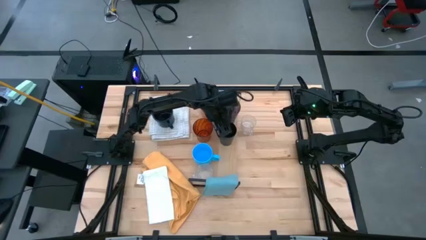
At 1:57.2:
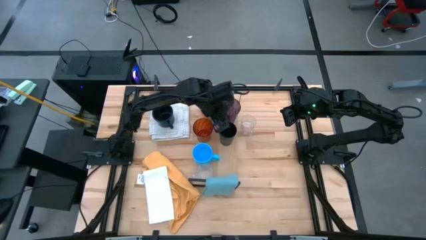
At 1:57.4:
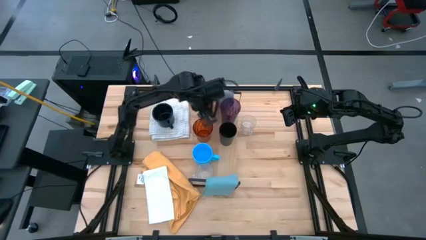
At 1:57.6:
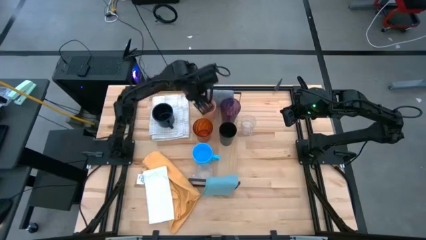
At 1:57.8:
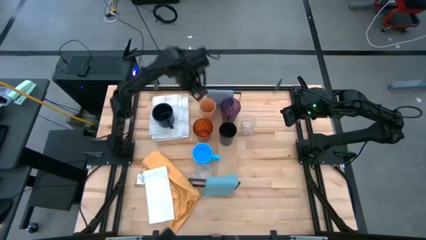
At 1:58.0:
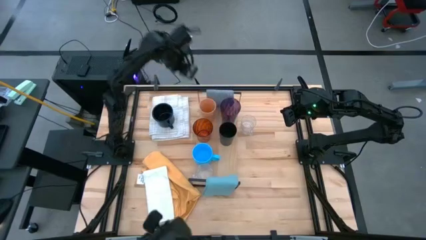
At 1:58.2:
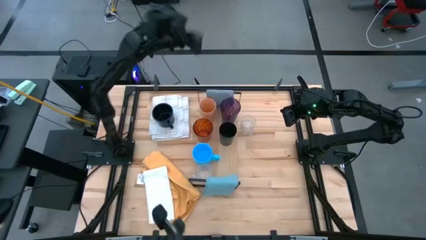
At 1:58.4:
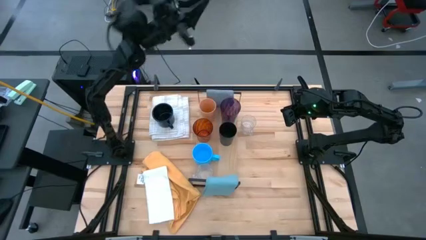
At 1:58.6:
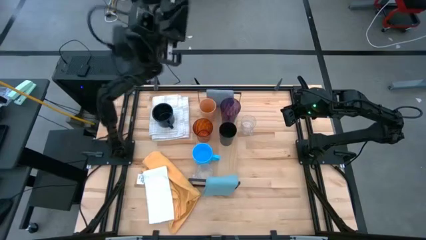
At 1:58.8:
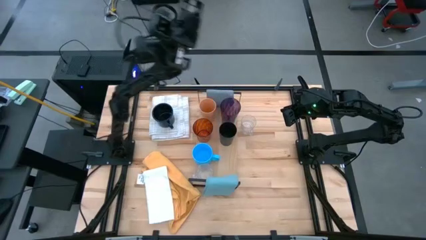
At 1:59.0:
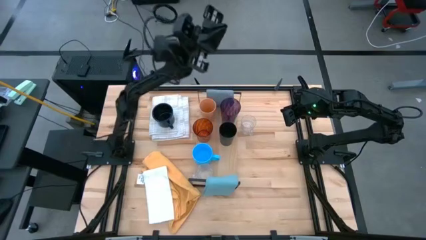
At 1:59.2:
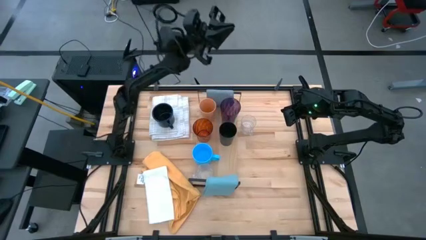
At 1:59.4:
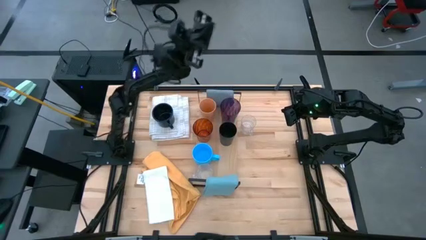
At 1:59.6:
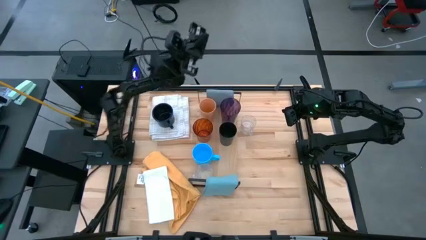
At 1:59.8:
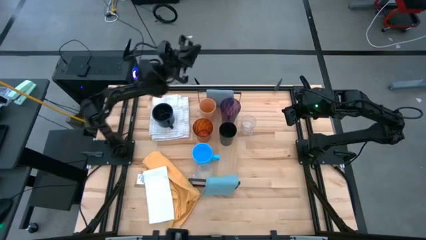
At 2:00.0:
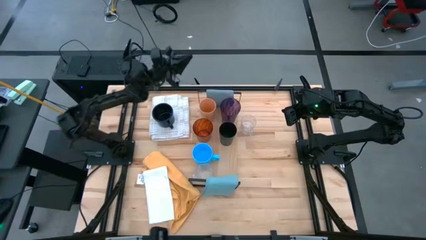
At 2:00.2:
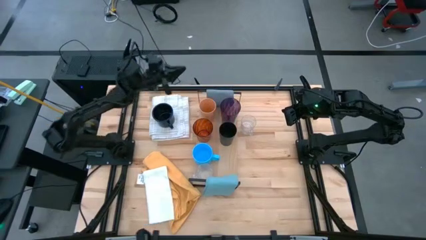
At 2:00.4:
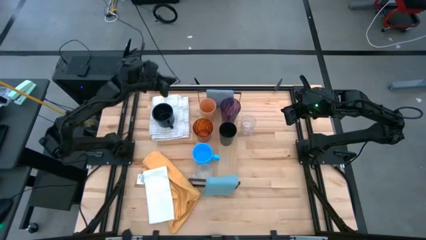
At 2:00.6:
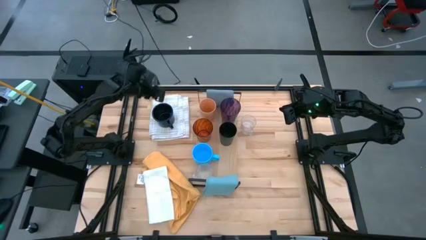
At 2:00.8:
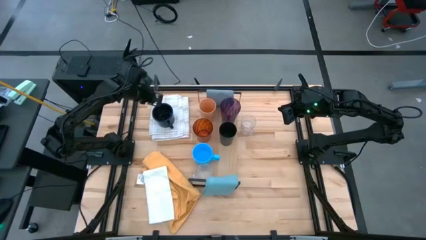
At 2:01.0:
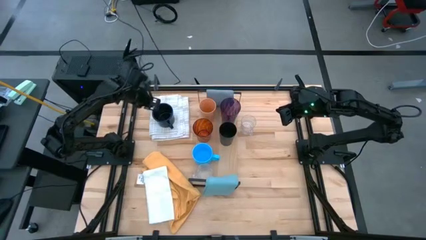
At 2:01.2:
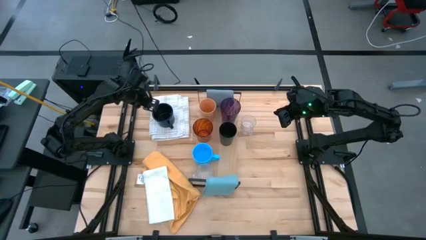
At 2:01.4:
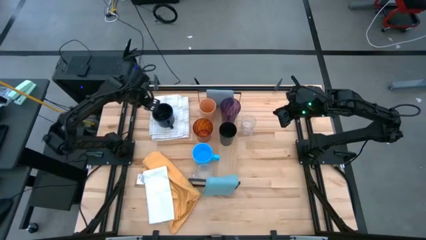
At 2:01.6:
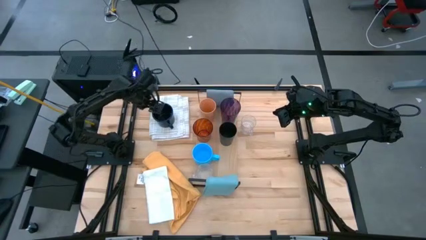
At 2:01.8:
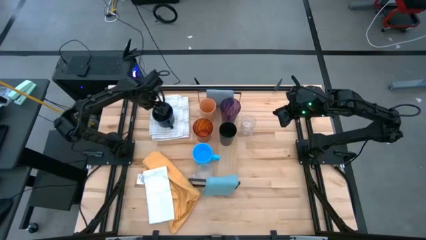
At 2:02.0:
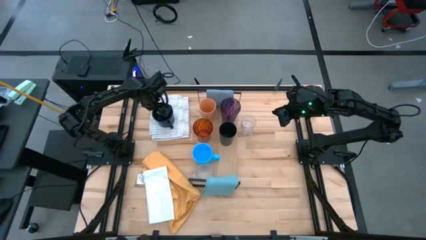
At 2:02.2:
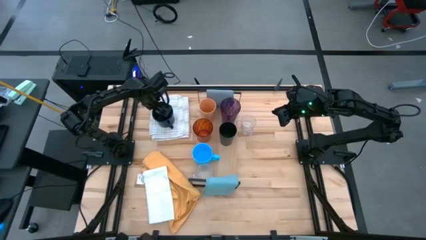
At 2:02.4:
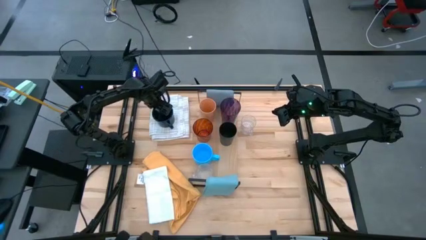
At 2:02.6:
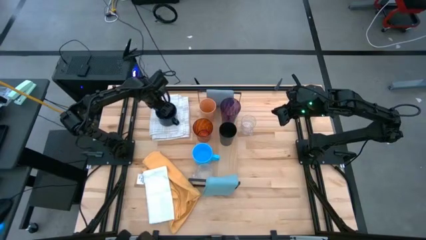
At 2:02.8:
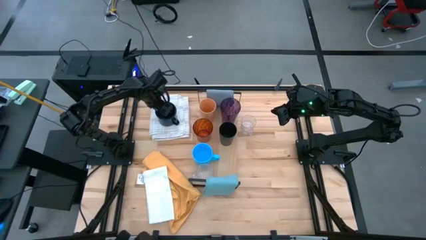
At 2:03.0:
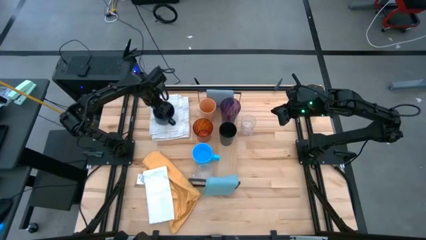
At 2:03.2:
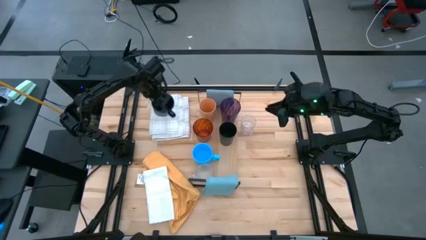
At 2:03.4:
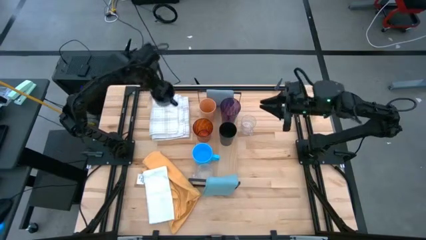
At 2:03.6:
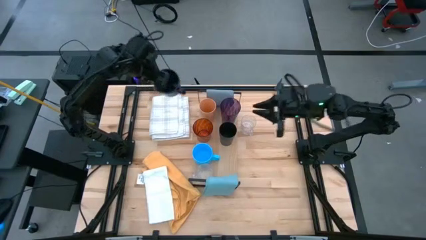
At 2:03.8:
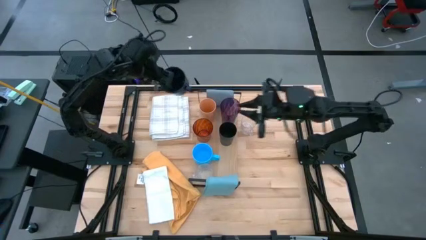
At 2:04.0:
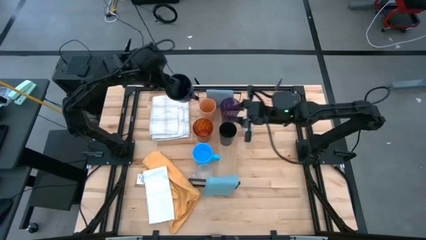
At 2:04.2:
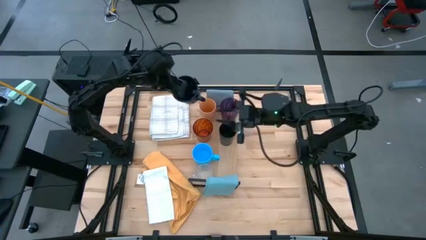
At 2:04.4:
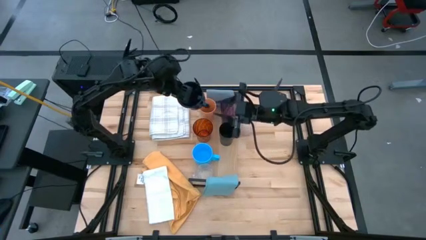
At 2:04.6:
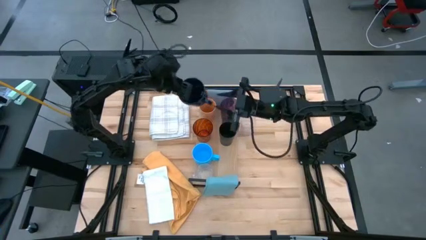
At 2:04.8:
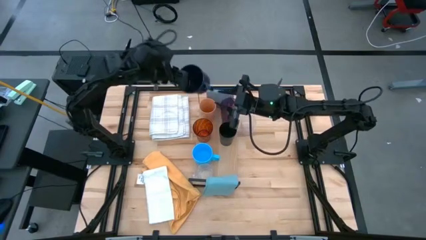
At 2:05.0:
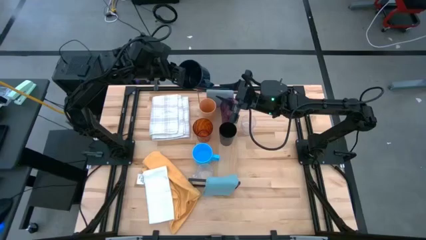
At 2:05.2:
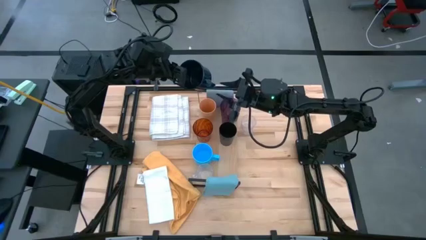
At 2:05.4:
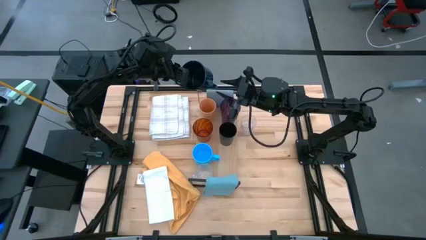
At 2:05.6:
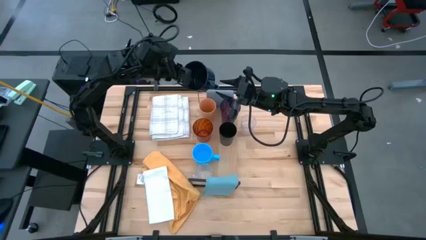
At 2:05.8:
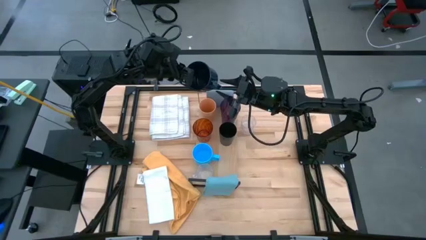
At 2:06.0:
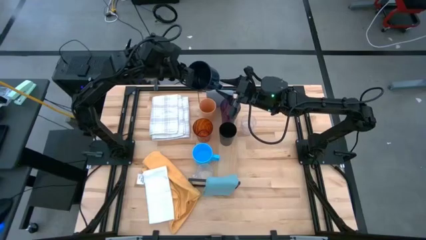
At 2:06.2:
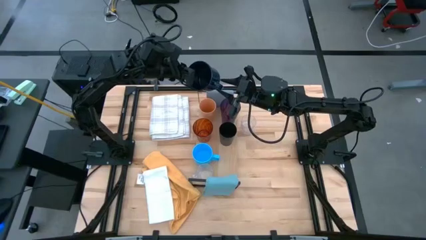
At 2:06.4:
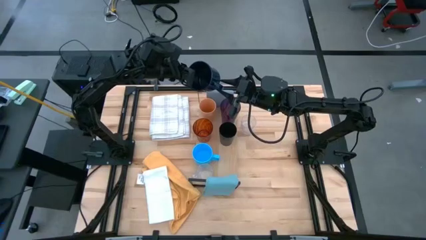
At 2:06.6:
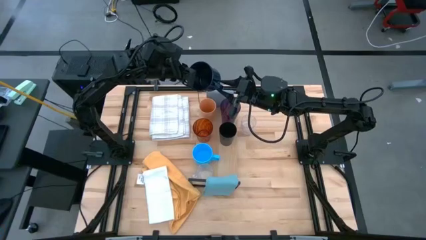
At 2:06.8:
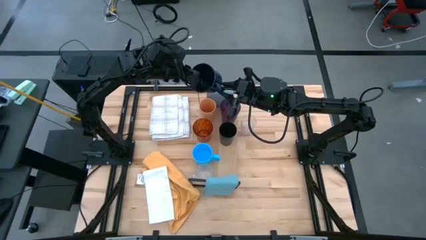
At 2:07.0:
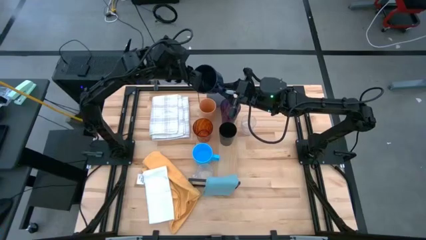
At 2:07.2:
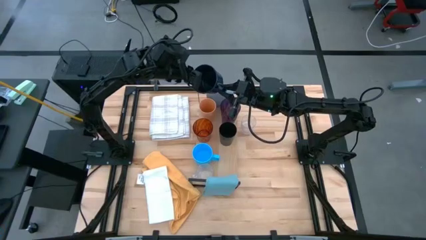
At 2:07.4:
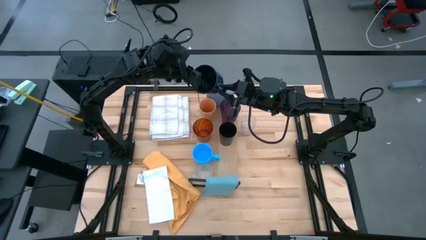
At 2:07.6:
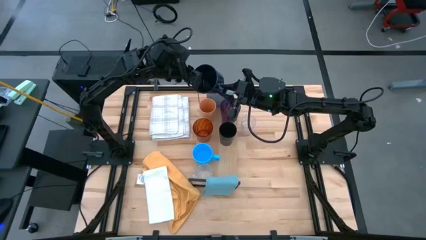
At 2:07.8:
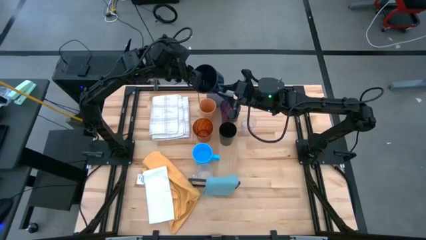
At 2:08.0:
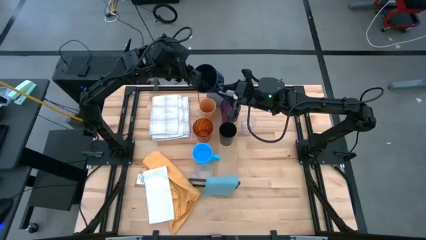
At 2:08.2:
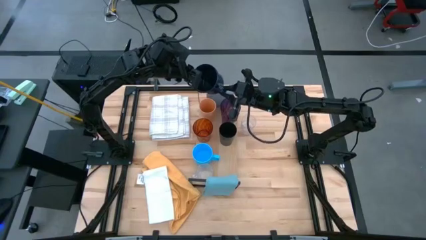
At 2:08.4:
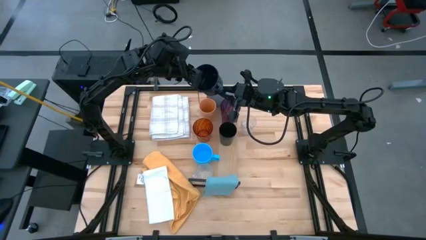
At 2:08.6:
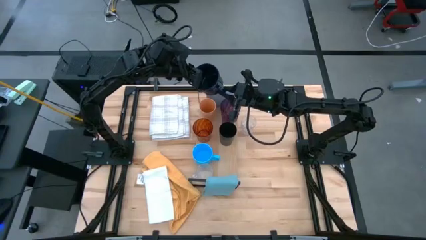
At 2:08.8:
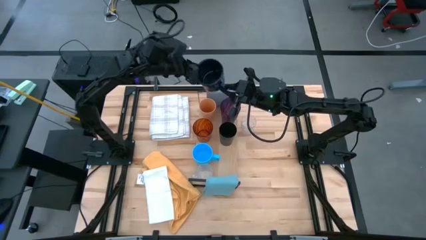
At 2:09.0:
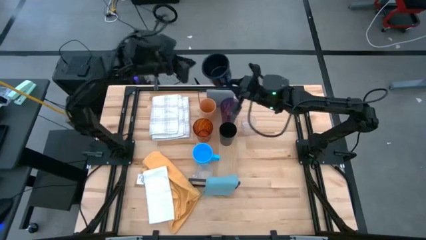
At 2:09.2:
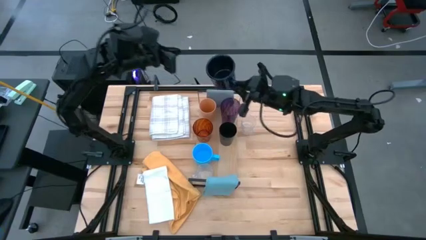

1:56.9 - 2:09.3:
Task: Stack small to large cups/mugs on shelf
Put the dark blue mug on the shelf

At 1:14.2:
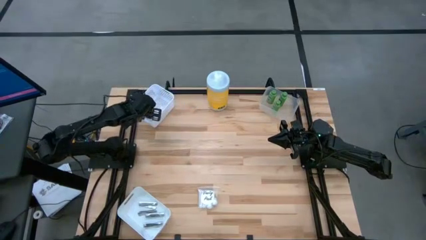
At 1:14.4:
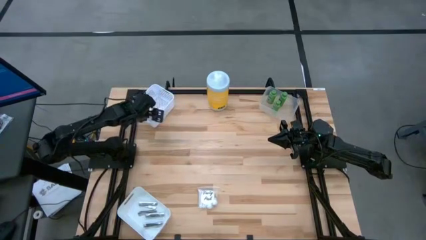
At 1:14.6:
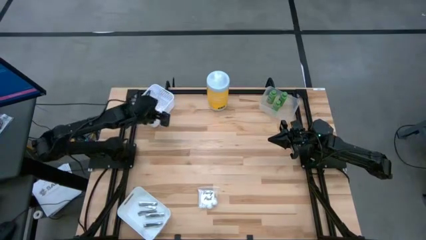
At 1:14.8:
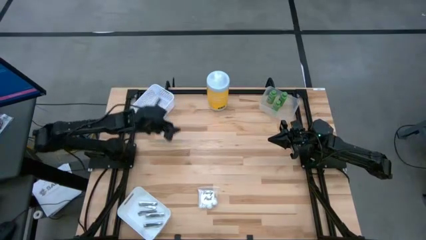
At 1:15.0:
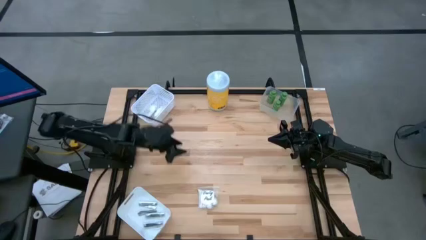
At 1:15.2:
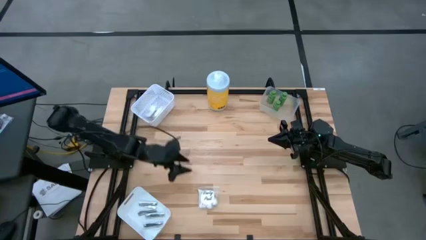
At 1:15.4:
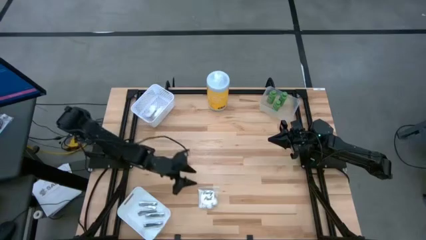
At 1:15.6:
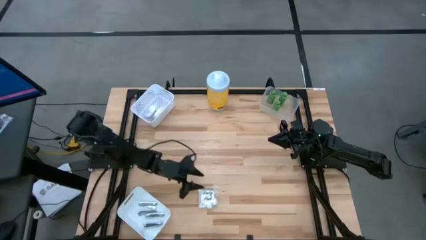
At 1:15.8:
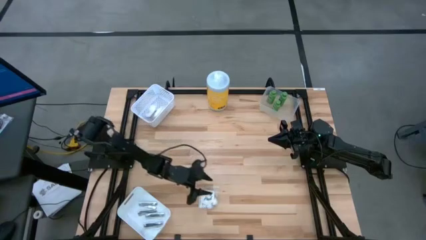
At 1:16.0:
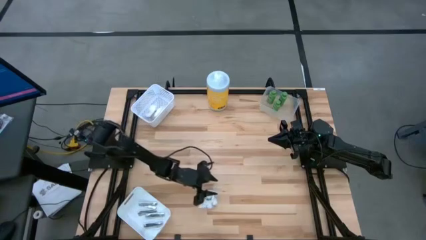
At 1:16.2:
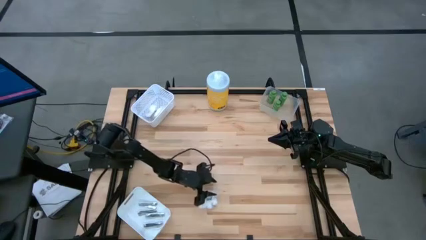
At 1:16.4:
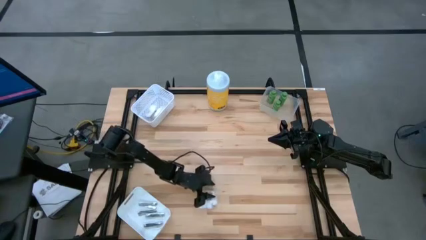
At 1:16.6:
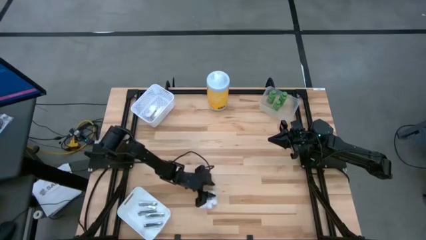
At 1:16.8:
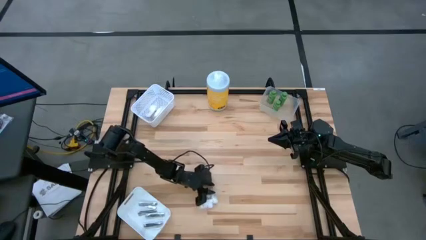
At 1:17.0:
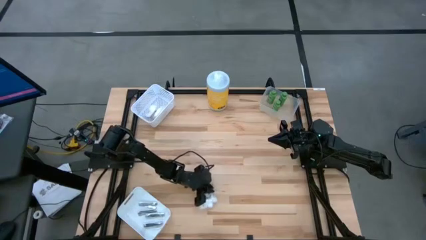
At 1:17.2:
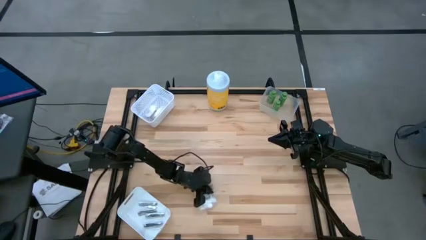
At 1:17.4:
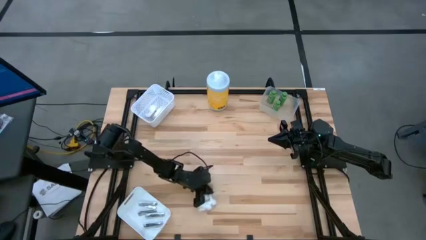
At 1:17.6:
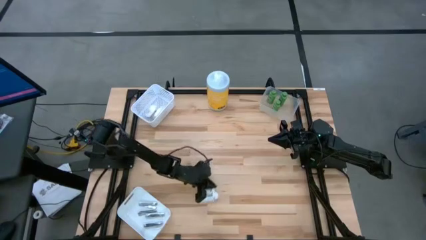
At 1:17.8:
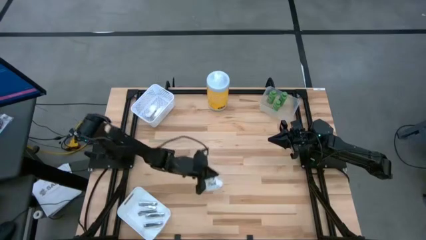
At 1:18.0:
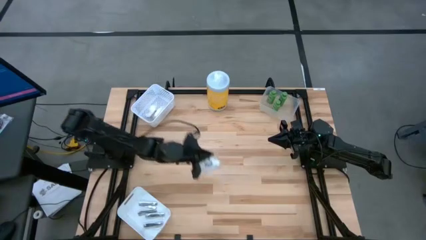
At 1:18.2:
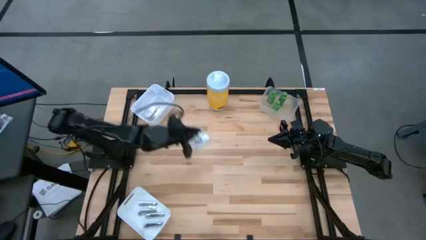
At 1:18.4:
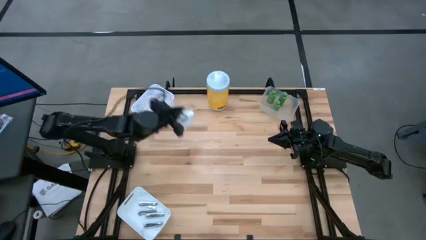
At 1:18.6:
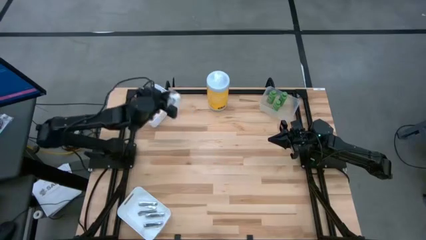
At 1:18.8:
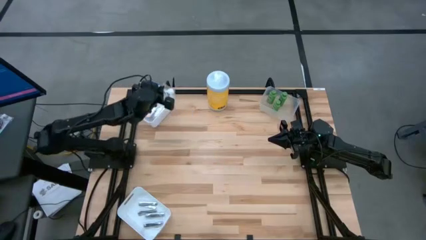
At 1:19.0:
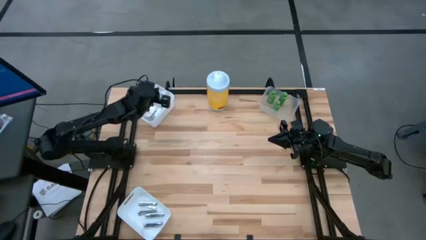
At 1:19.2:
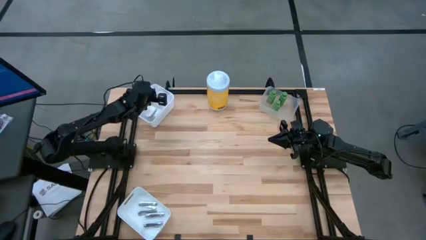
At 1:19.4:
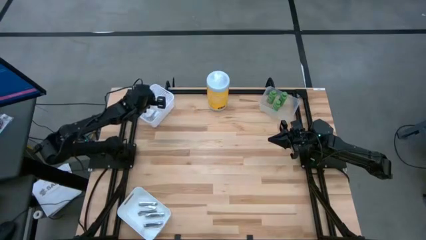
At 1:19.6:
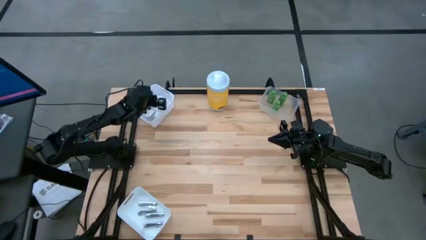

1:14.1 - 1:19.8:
Task: Pick & Place Travel size toiletries
Put the white cotton pack into the white basket
